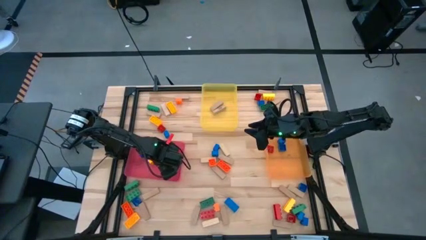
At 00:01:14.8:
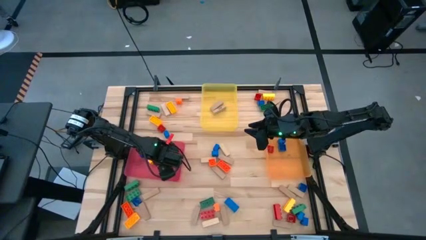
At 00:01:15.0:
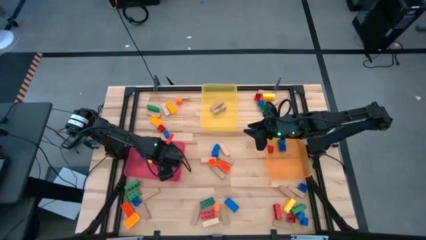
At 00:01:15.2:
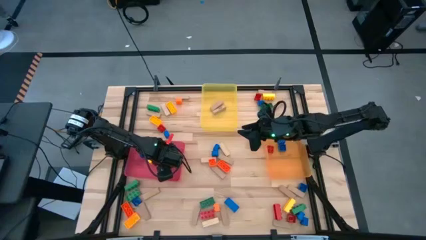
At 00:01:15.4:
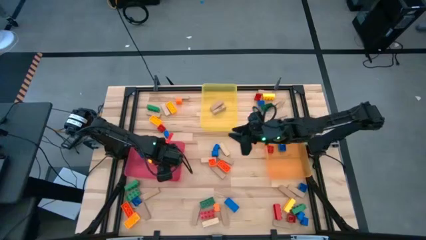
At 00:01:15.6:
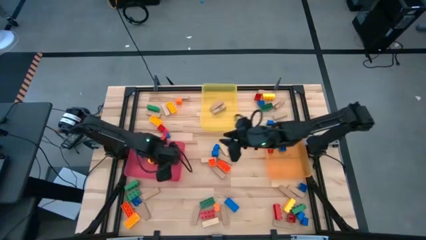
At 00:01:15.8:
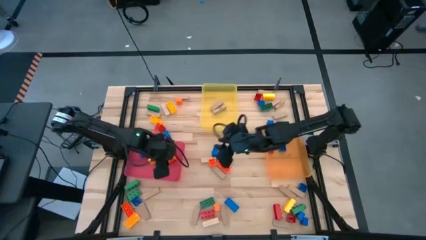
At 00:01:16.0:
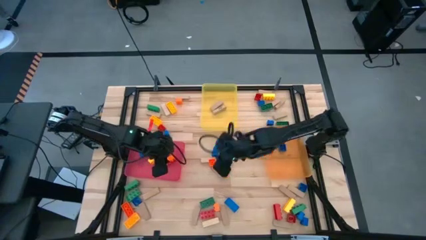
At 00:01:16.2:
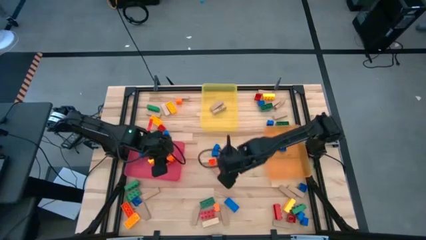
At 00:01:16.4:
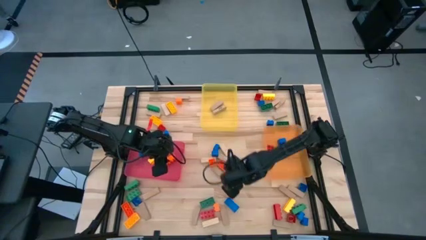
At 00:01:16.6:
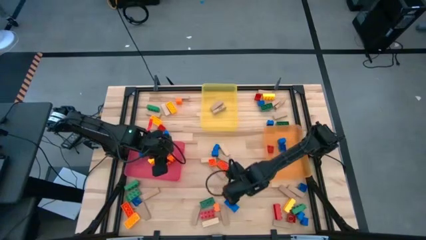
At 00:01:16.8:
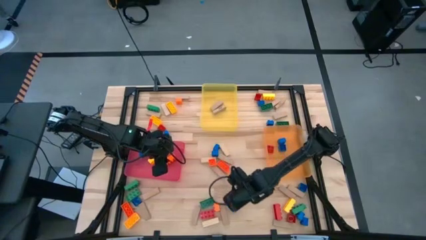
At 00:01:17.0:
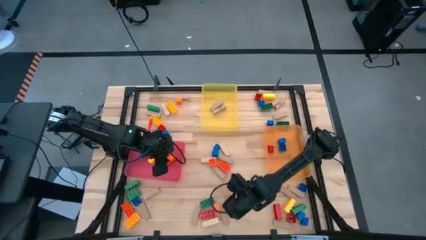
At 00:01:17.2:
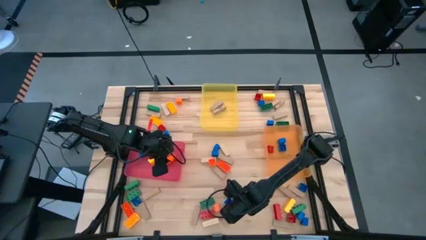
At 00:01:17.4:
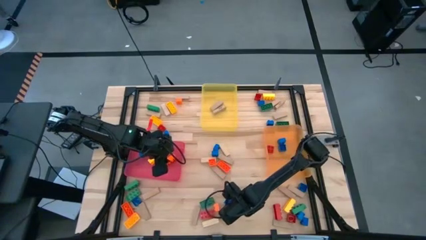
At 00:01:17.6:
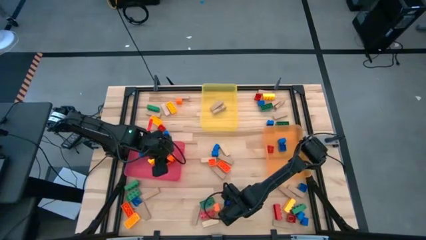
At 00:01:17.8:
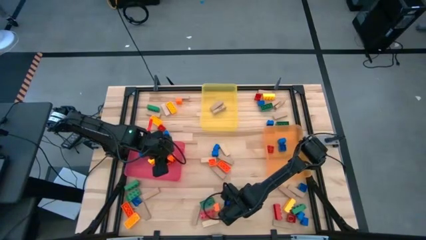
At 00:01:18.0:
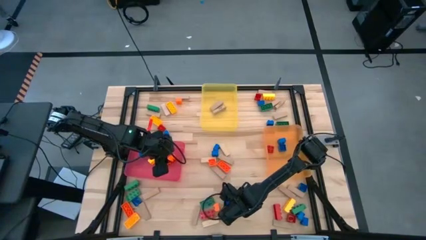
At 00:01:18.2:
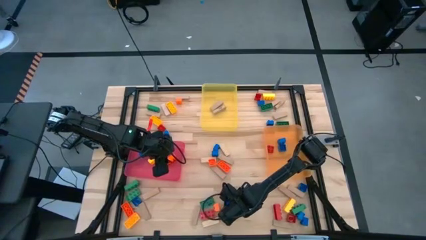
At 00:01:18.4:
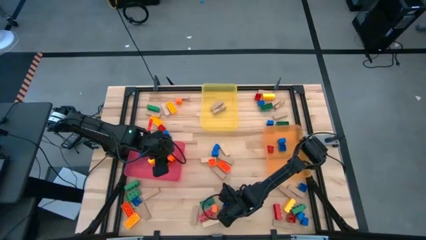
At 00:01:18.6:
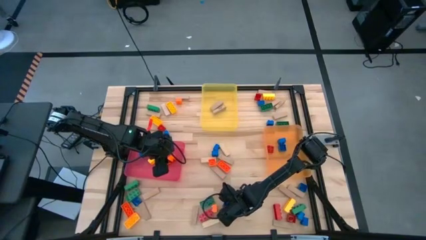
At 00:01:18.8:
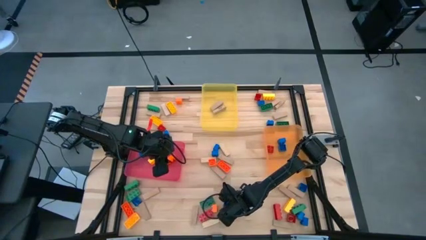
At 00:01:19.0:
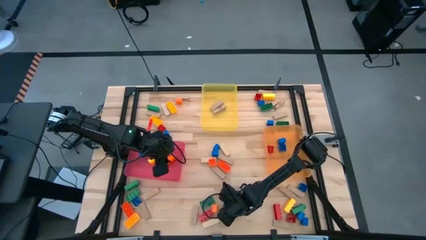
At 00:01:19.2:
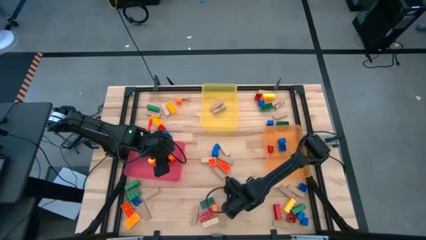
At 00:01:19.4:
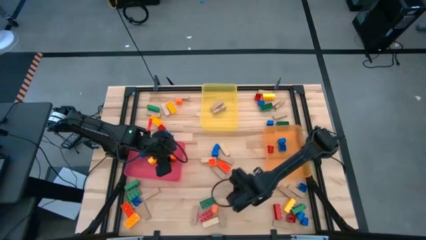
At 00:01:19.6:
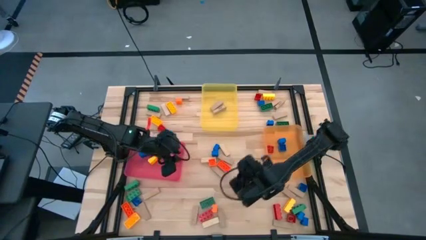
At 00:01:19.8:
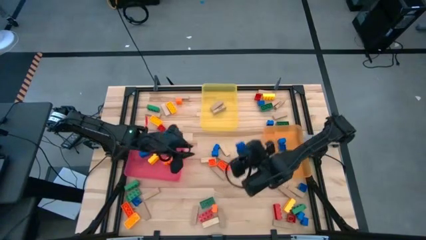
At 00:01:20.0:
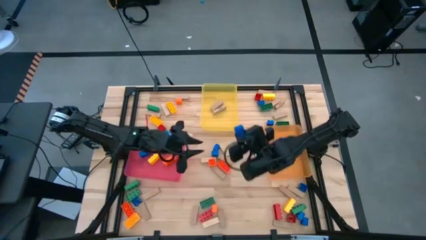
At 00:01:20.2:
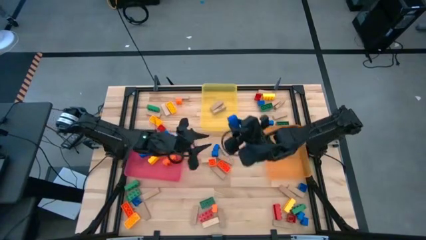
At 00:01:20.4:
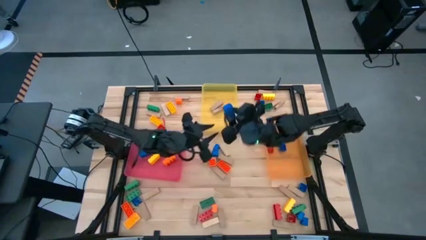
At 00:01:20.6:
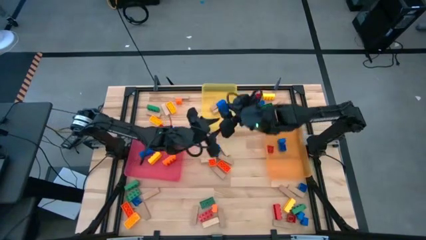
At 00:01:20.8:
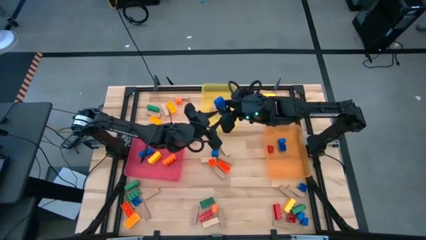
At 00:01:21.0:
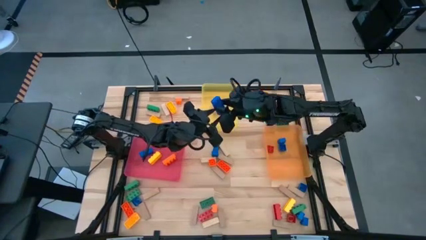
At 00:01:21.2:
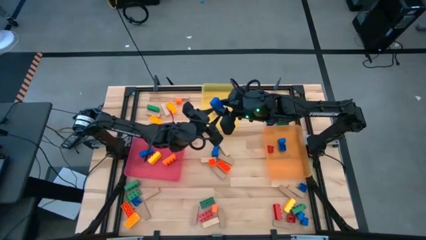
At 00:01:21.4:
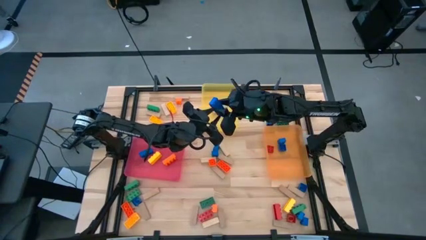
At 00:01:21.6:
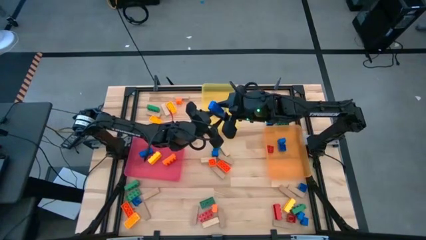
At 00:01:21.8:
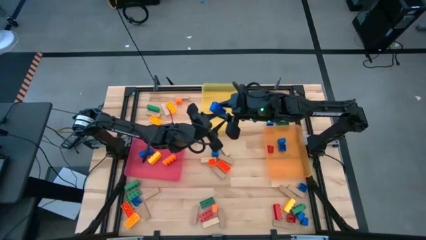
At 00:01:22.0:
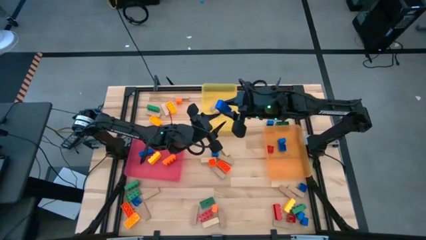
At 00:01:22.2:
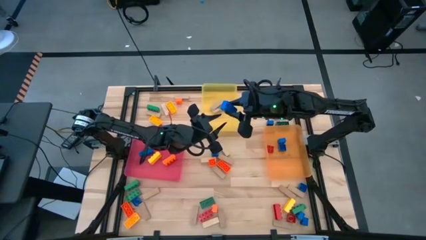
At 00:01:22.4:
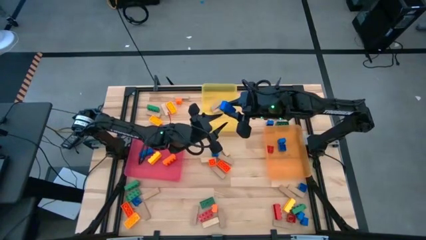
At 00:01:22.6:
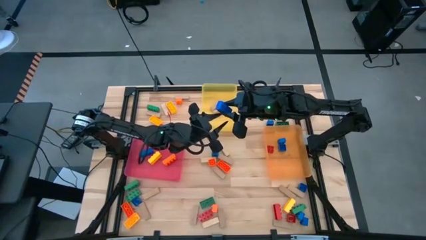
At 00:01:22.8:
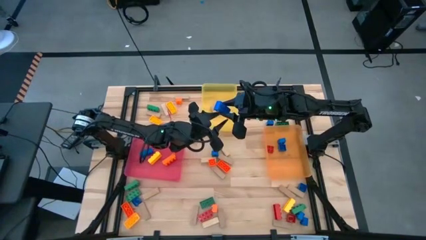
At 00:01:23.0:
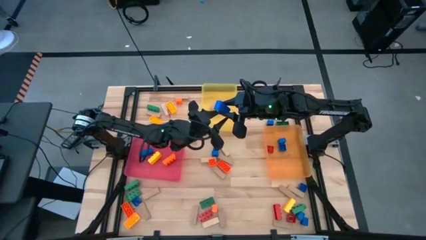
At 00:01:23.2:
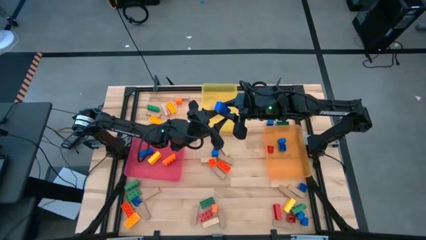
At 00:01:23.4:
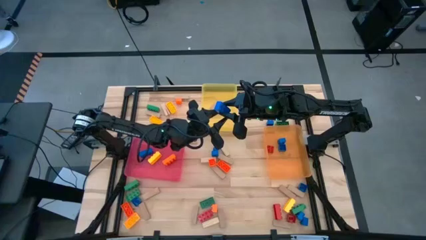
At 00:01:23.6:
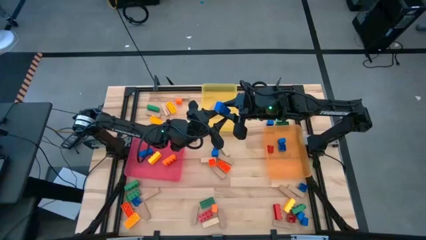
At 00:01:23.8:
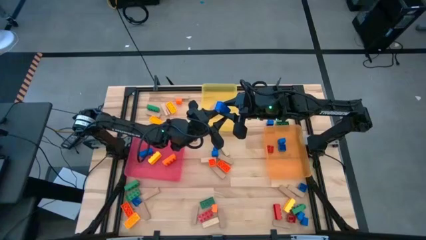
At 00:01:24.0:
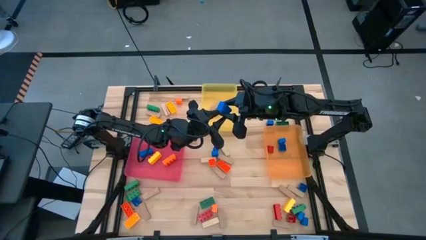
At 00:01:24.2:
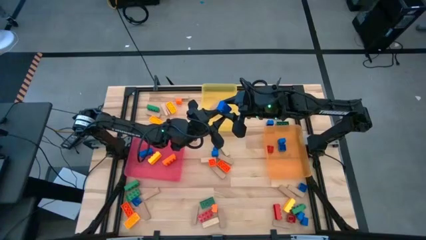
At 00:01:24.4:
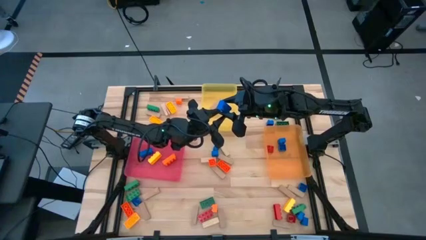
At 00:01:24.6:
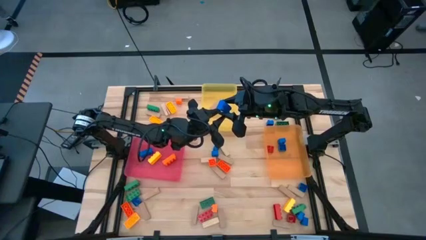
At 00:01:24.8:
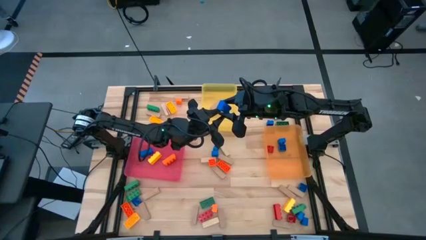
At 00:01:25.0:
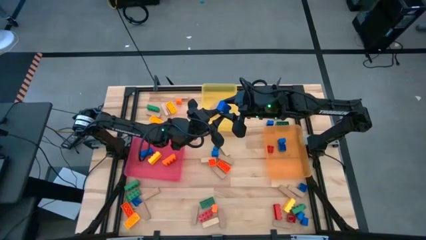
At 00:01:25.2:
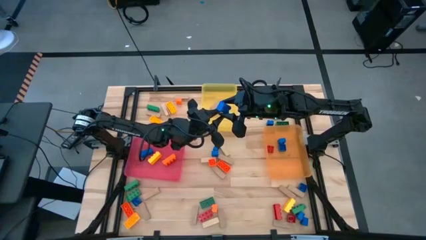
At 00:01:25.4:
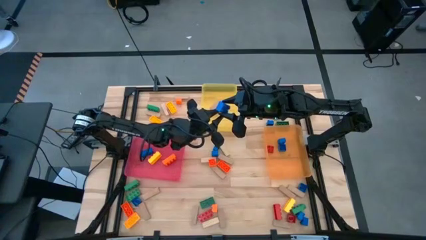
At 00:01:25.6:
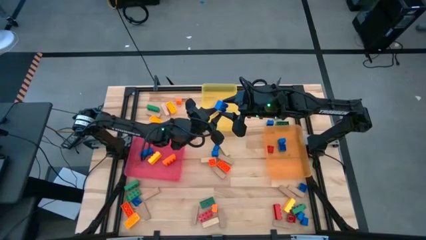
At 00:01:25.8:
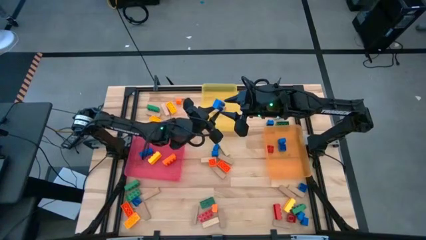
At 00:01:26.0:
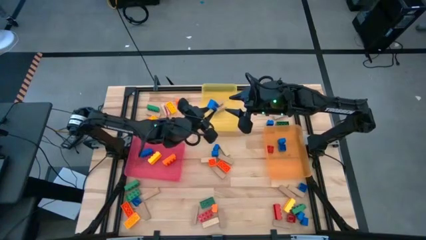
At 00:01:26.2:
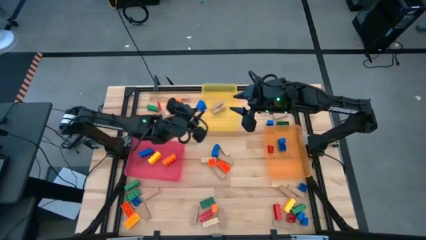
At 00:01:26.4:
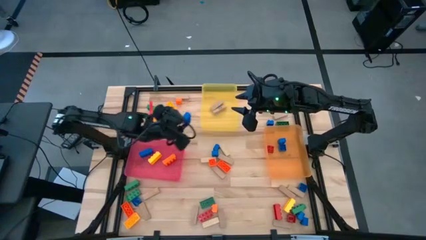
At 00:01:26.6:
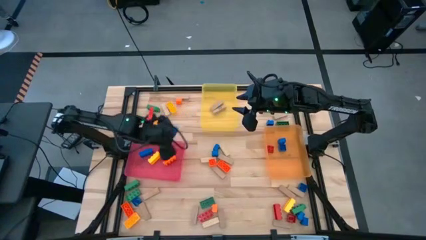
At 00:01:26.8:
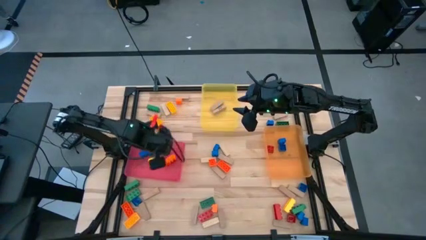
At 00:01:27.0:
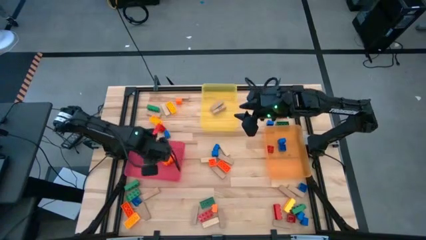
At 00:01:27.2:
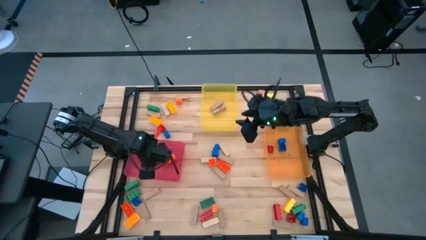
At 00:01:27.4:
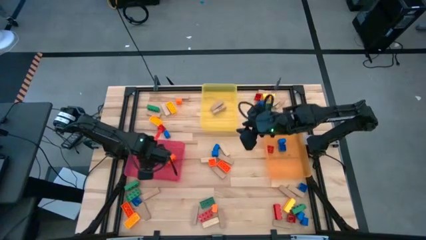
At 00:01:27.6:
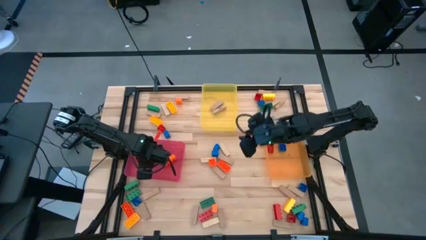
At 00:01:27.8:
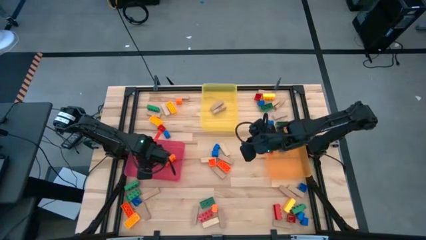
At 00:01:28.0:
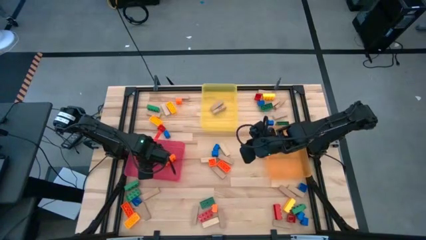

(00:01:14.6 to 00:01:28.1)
Task: Sort blocks by size
Put the 3 stud blue game piece into the pink bin

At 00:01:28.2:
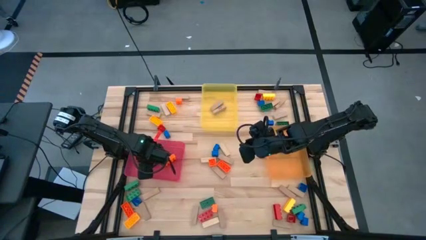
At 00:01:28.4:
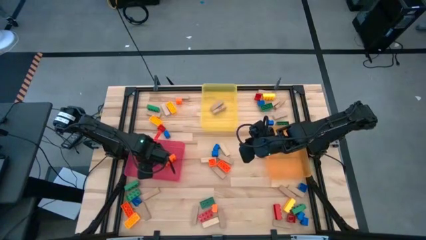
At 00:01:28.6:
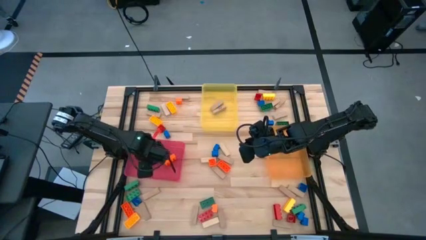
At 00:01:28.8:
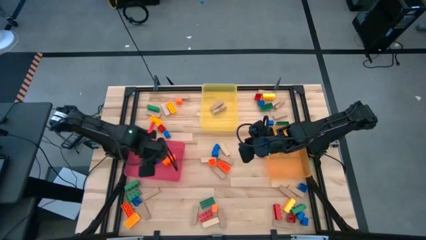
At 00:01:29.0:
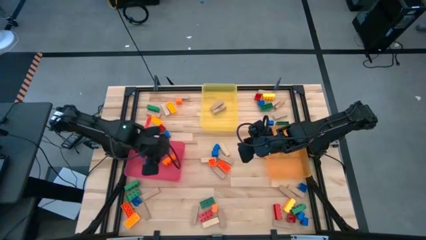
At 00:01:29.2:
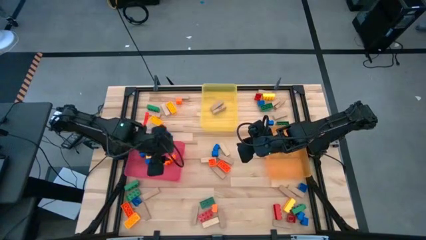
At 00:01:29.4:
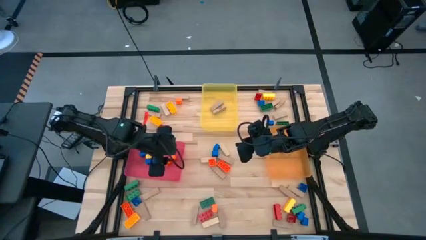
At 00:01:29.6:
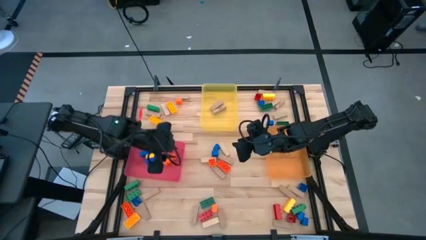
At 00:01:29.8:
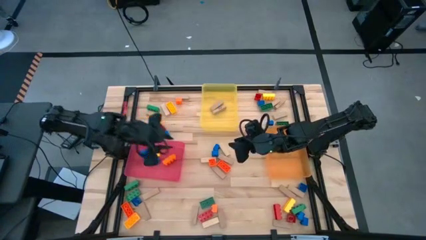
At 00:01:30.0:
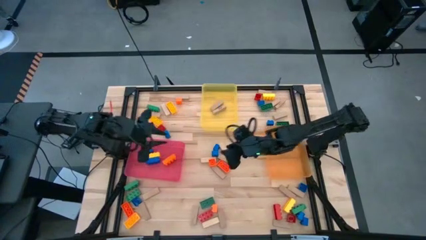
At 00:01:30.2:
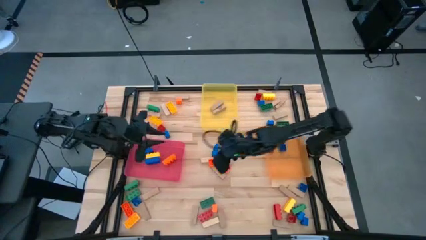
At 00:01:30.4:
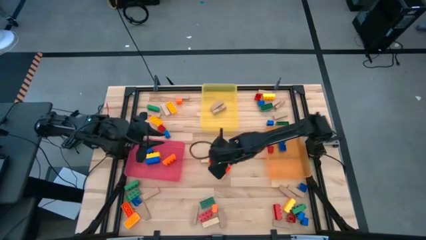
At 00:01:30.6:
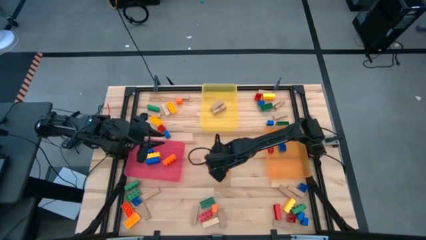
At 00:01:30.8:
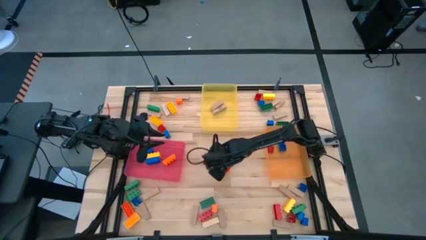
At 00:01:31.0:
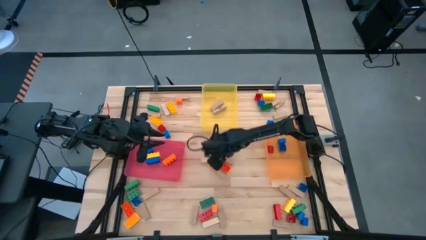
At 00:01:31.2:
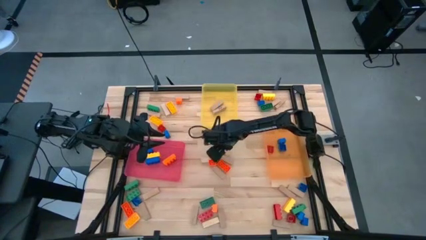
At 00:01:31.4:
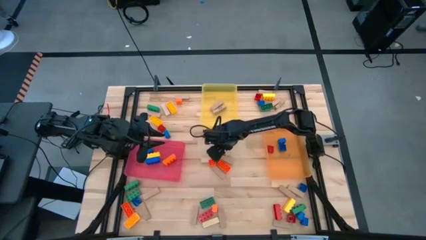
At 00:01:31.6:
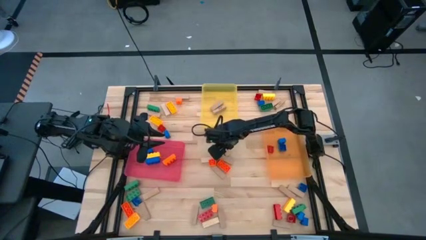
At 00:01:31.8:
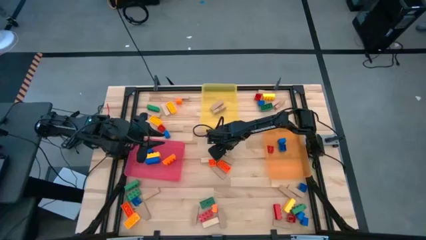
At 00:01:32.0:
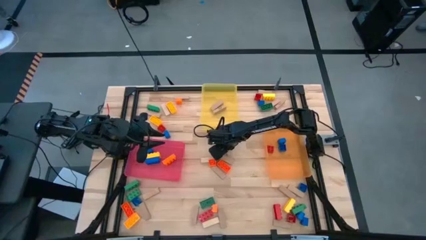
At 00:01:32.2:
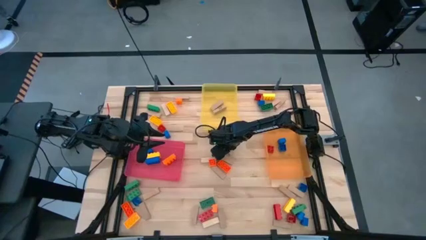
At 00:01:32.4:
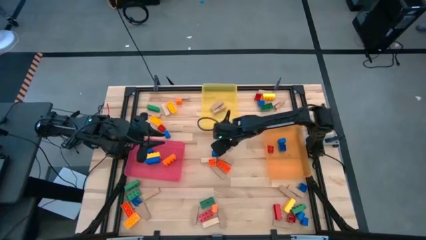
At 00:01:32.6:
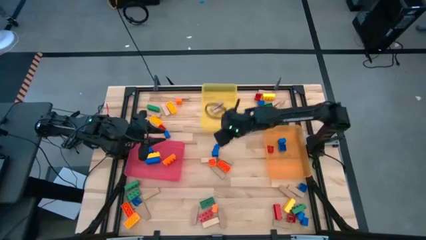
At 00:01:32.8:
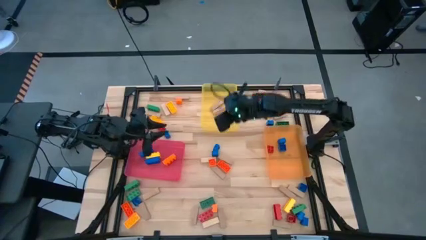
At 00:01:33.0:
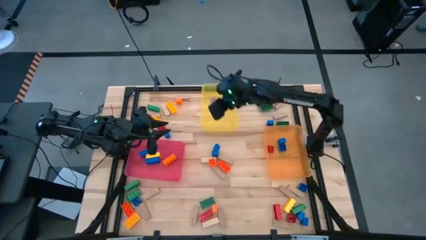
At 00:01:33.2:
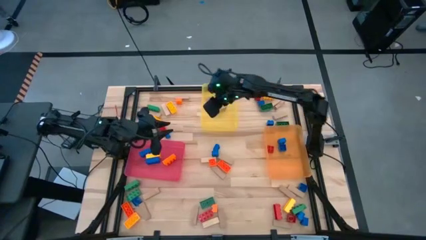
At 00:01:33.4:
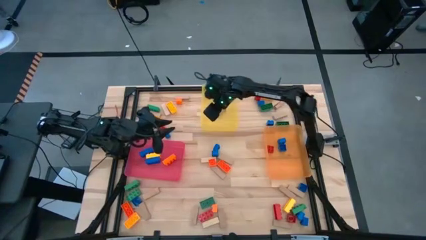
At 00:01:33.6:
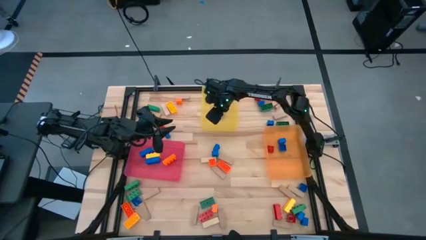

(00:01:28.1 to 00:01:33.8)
Put the wooden block into the yellow bin
